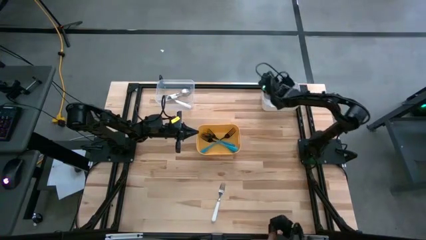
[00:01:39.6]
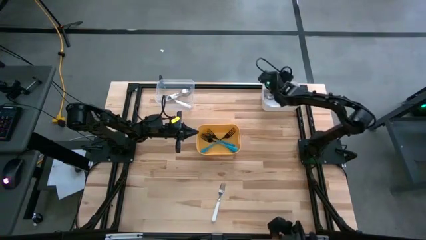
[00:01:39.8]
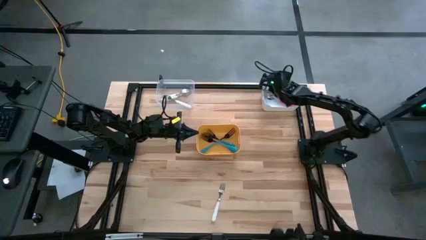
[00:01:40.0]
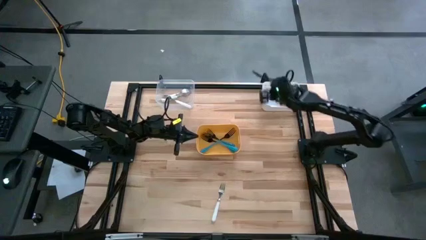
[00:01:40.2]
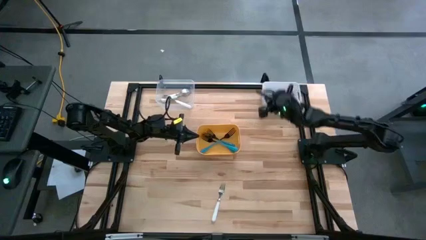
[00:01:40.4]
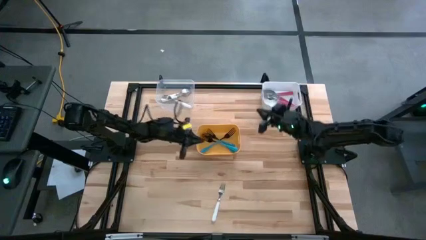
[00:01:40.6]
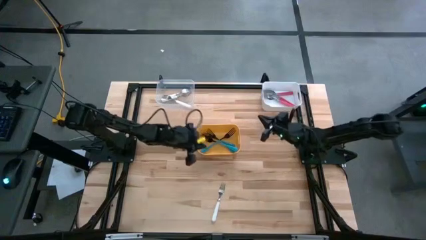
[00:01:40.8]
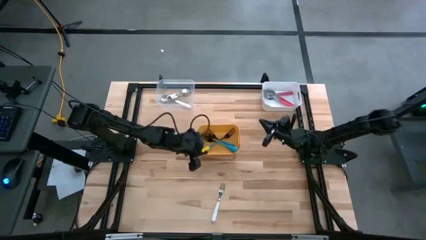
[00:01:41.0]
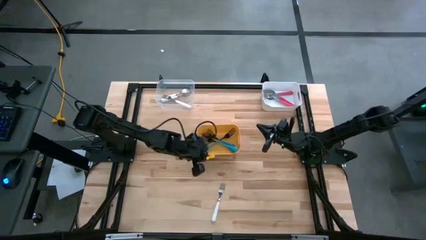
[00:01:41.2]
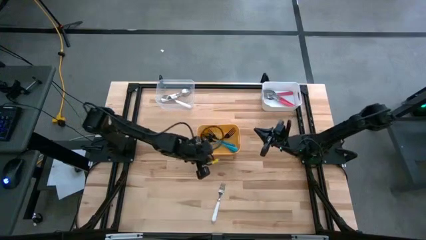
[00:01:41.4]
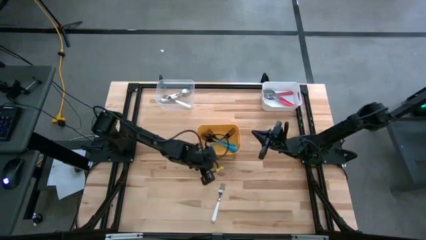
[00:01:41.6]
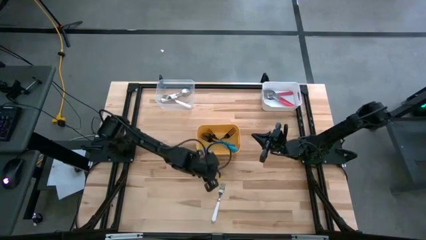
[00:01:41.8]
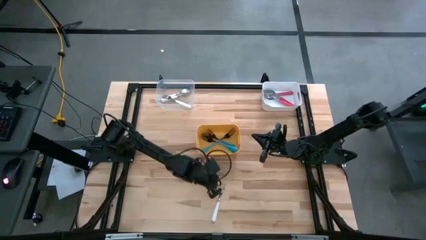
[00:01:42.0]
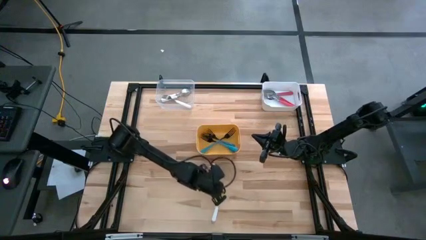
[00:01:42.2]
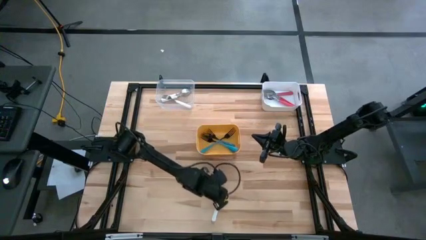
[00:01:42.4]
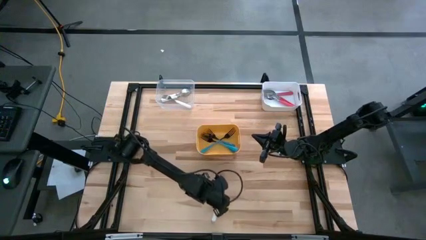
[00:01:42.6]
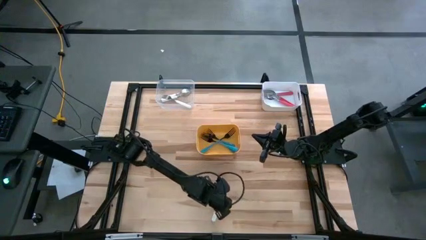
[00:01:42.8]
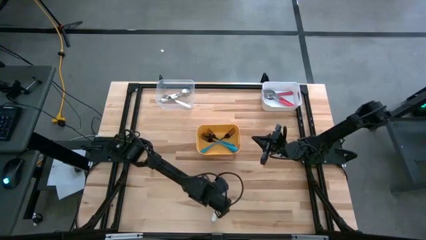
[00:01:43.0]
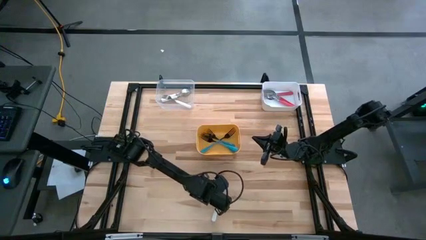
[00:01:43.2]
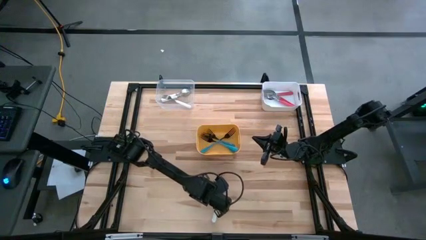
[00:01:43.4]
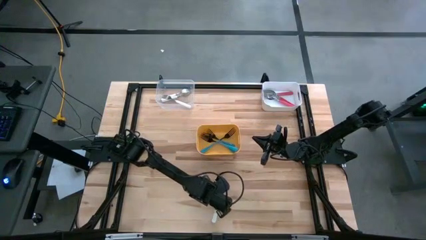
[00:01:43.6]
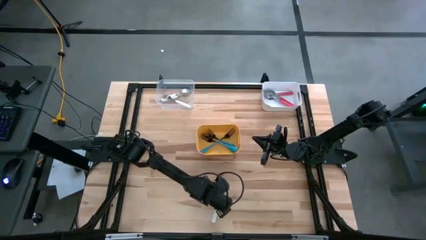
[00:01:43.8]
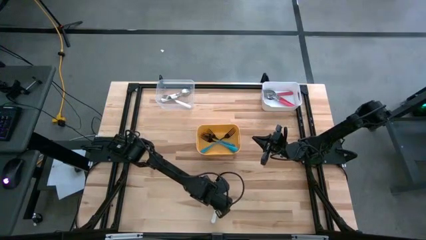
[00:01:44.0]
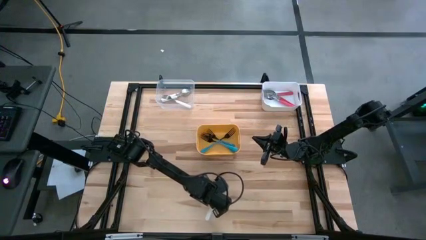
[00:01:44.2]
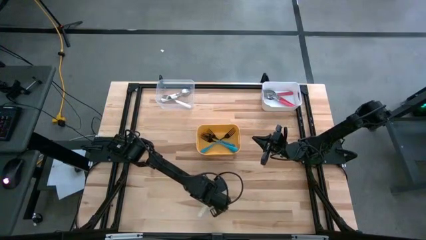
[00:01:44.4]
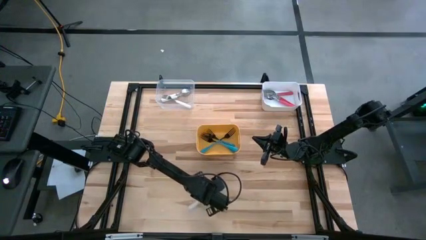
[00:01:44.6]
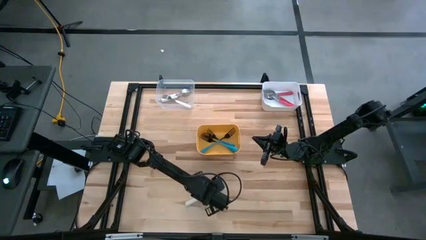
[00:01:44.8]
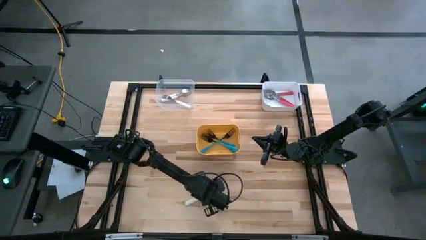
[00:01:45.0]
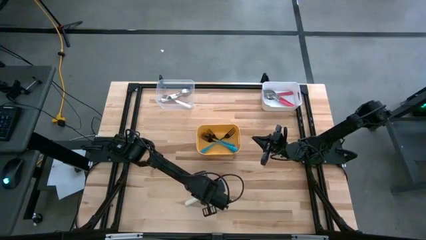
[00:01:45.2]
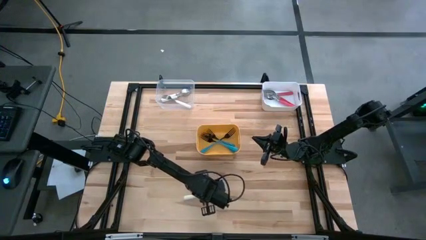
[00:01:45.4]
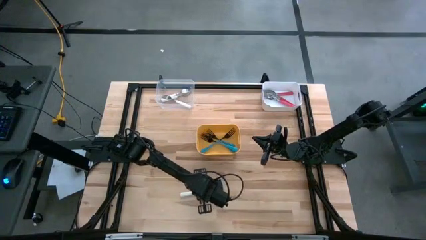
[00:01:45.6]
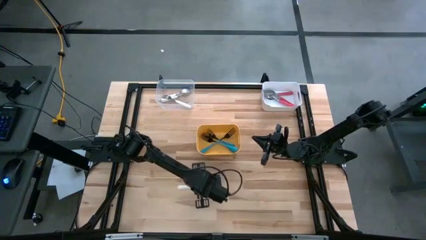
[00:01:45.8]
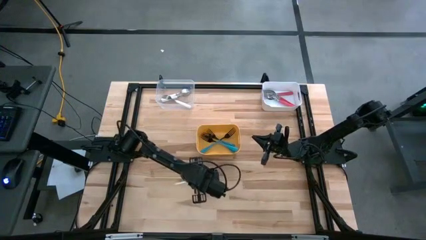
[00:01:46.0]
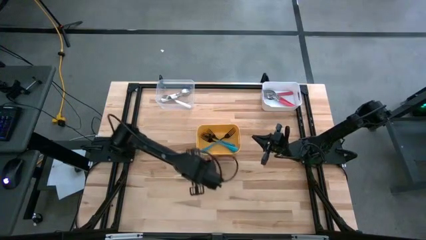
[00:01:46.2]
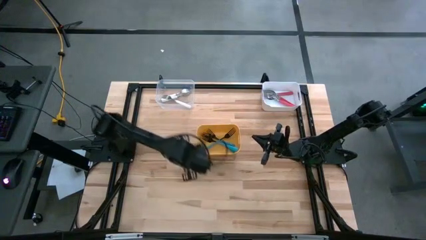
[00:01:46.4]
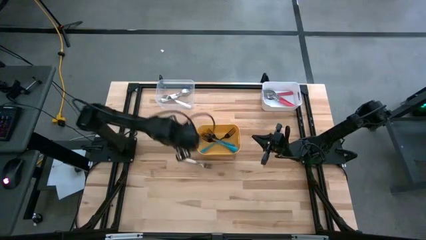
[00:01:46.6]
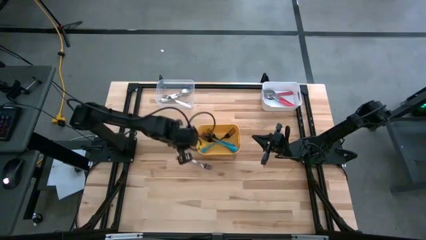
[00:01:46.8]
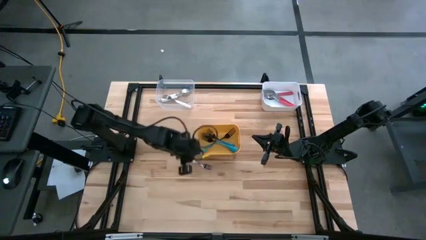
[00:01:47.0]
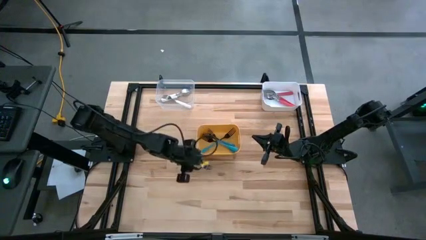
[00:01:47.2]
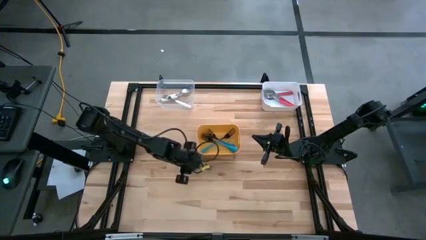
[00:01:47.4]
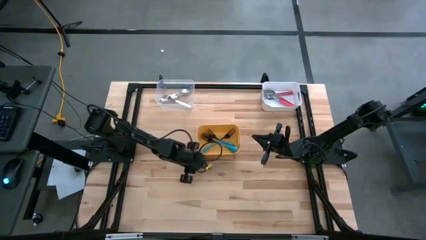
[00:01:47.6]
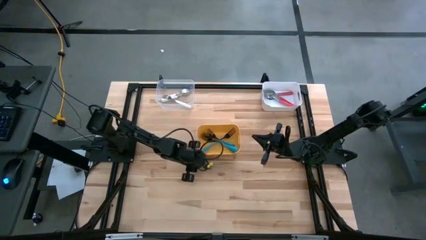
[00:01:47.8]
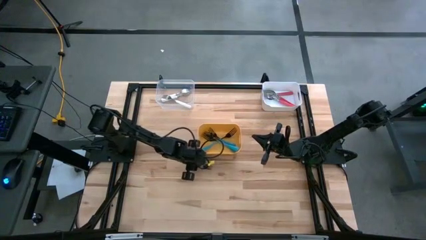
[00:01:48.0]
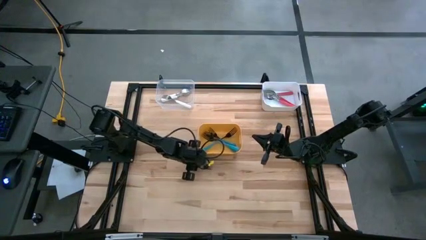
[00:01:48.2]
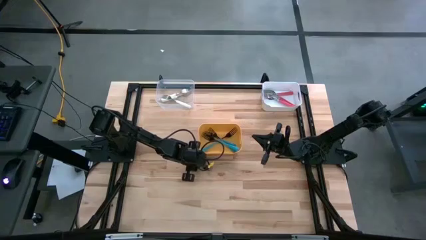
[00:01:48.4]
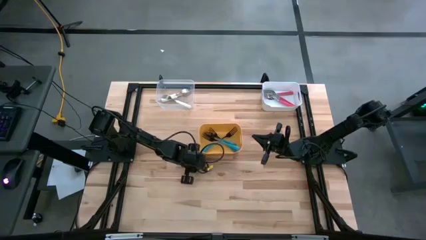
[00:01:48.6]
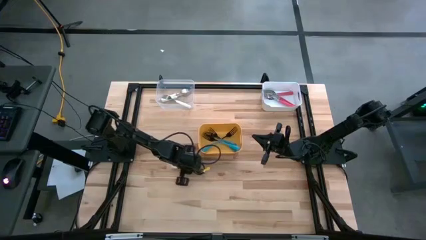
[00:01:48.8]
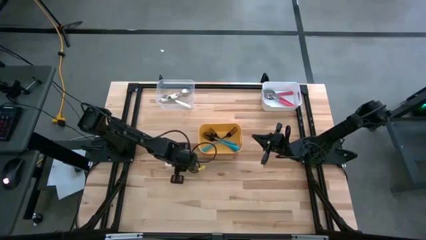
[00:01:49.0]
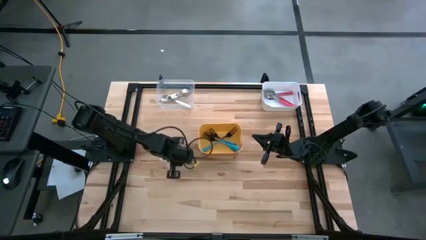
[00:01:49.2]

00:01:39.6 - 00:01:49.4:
Task: Sort silverware by color (type)
Put the white fork into the transparent bin

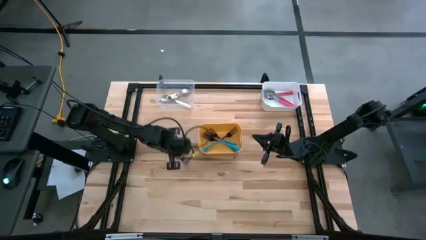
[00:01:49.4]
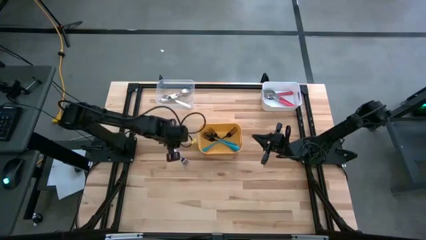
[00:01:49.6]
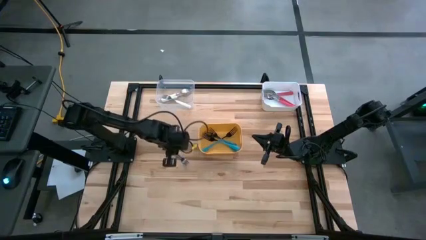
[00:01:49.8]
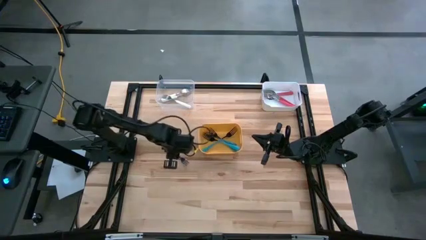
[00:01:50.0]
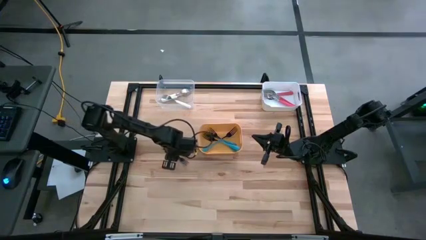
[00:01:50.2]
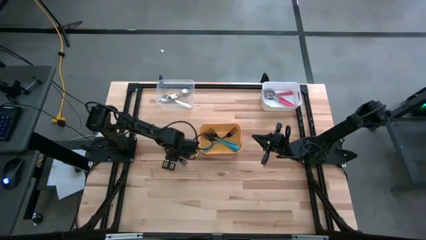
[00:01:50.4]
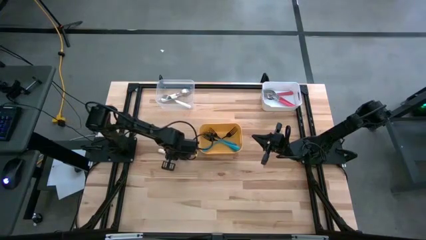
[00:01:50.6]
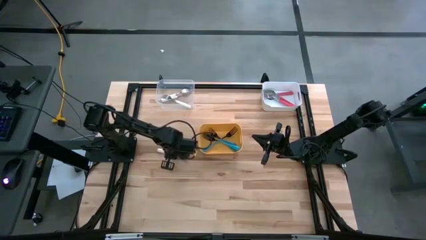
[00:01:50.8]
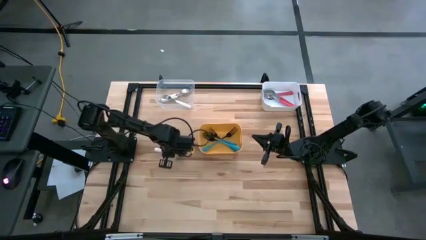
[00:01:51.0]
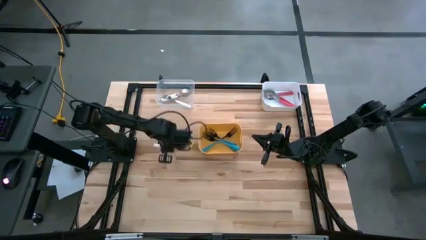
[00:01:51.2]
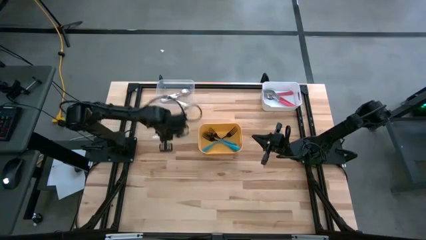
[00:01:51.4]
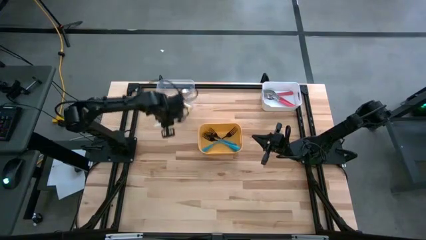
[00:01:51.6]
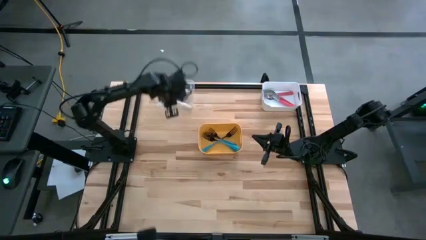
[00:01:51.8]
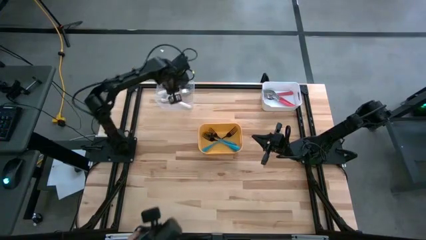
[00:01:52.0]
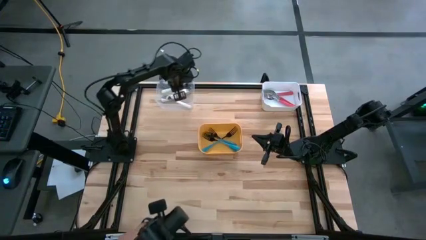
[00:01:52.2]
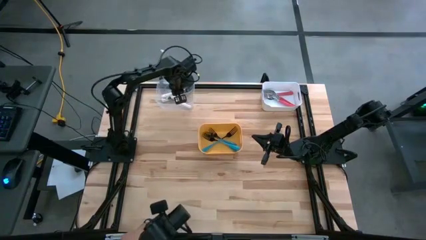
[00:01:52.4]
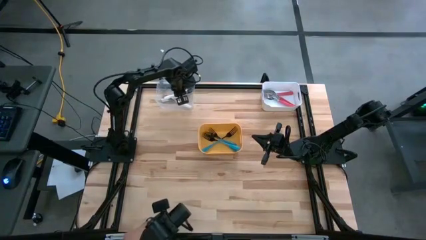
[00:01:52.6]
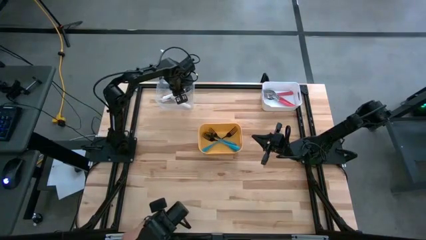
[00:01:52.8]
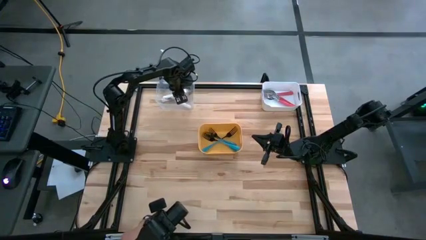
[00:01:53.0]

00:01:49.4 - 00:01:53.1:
Put the white fork into the transparent bin
